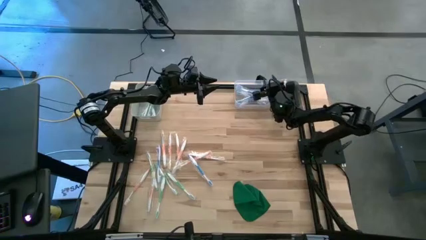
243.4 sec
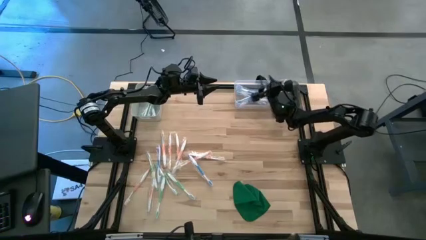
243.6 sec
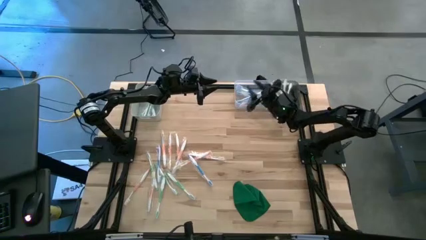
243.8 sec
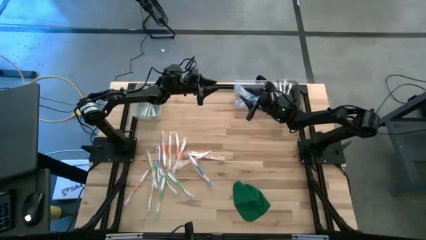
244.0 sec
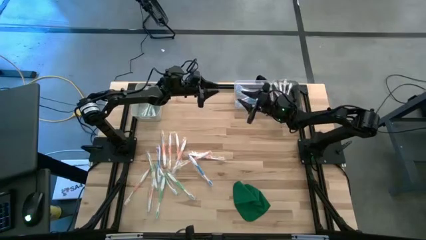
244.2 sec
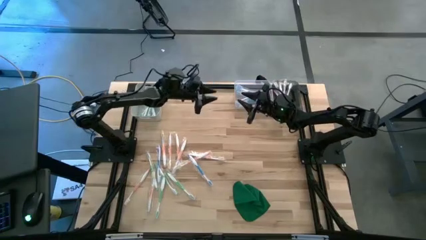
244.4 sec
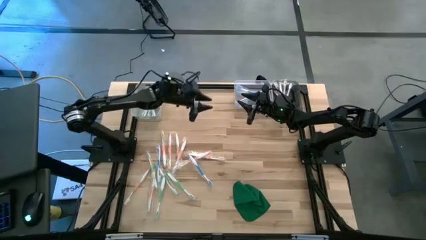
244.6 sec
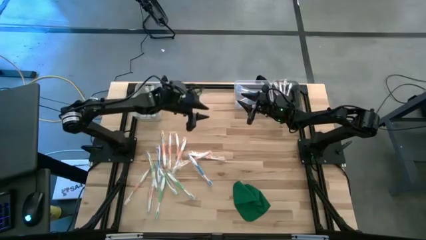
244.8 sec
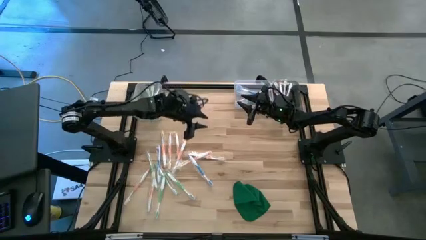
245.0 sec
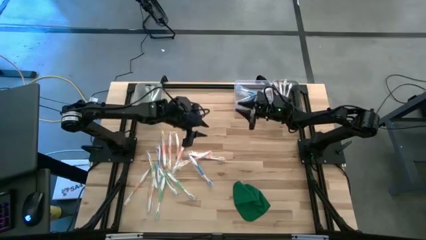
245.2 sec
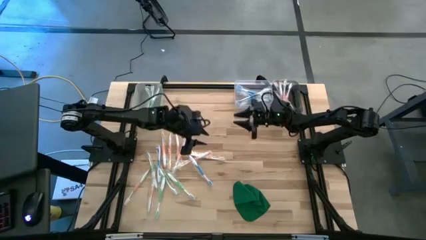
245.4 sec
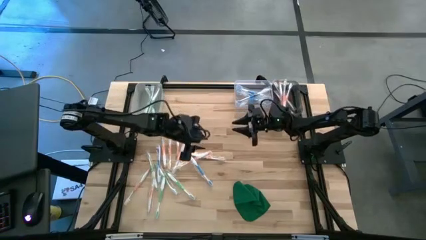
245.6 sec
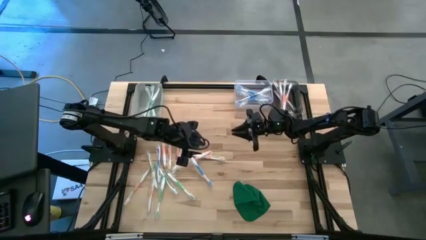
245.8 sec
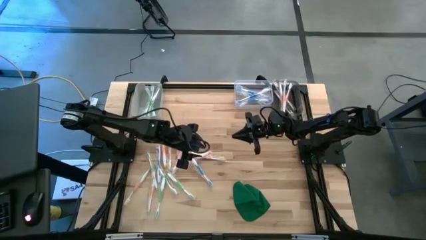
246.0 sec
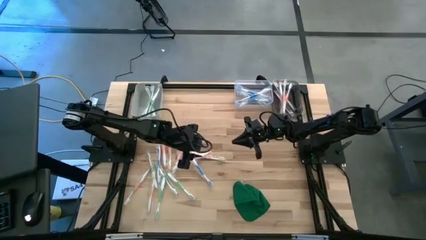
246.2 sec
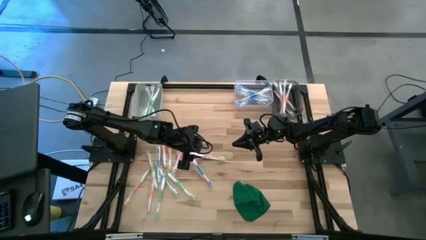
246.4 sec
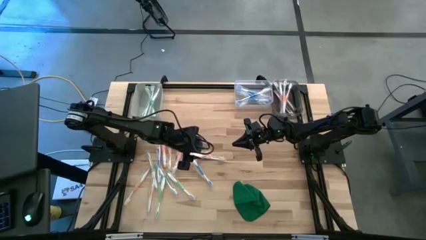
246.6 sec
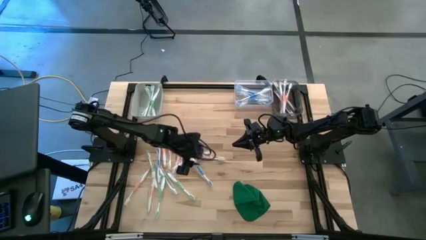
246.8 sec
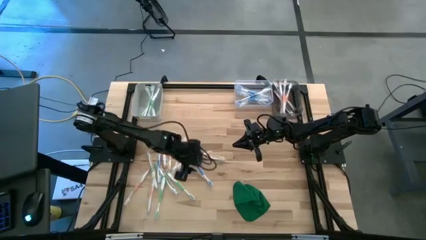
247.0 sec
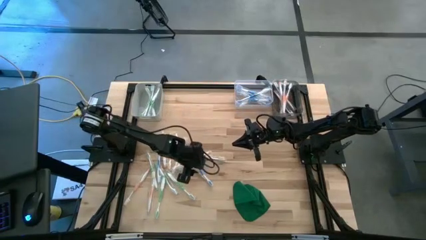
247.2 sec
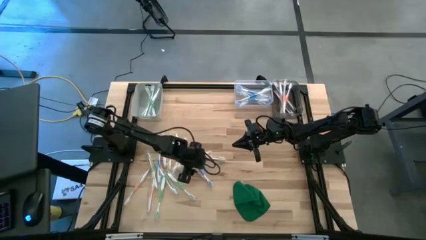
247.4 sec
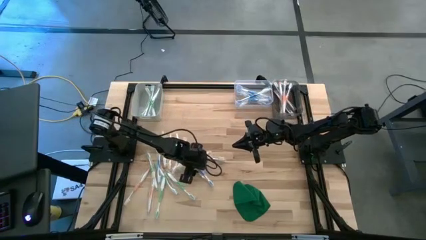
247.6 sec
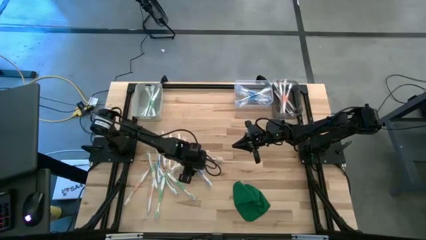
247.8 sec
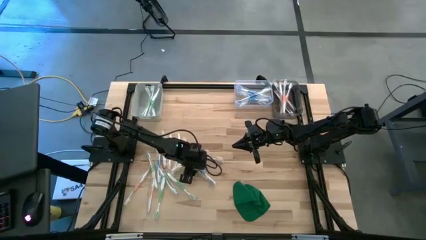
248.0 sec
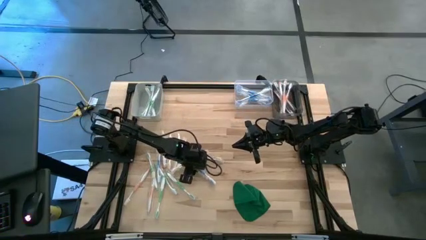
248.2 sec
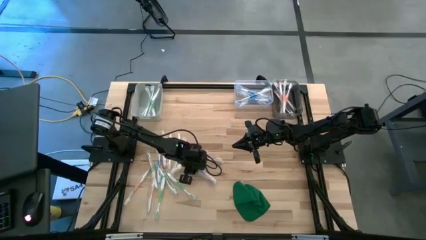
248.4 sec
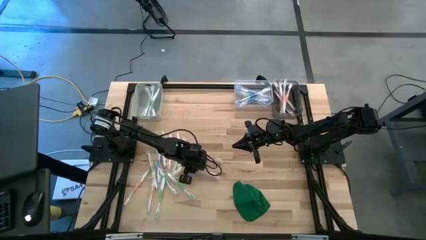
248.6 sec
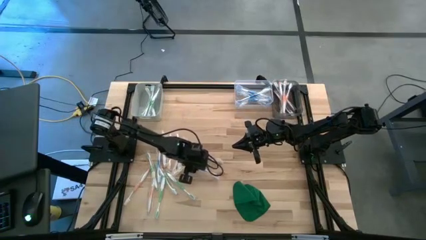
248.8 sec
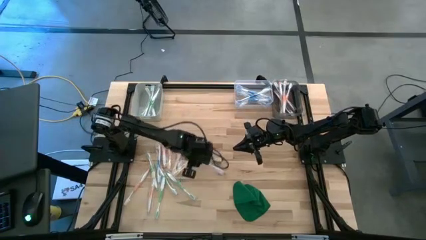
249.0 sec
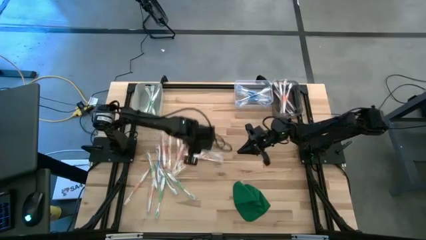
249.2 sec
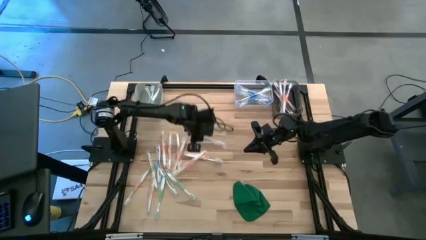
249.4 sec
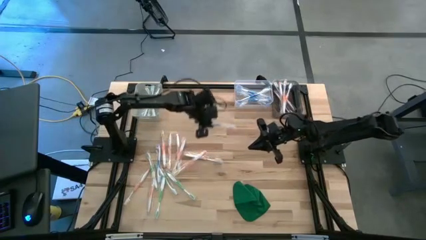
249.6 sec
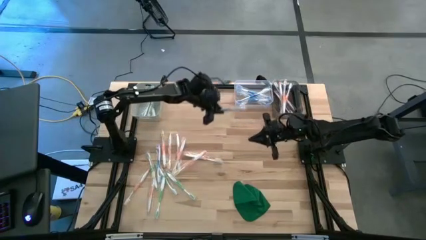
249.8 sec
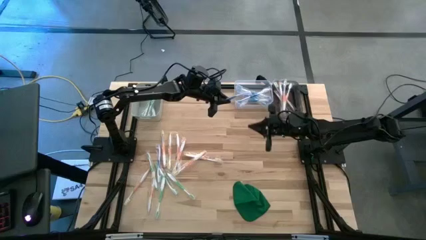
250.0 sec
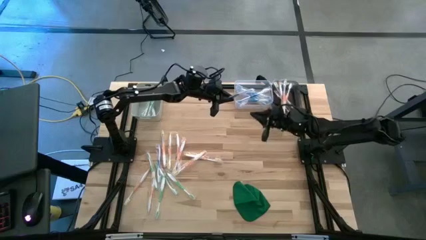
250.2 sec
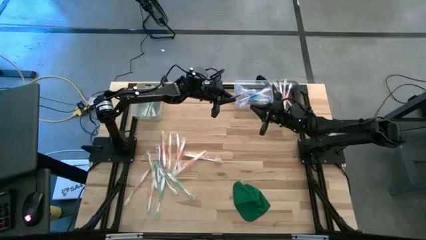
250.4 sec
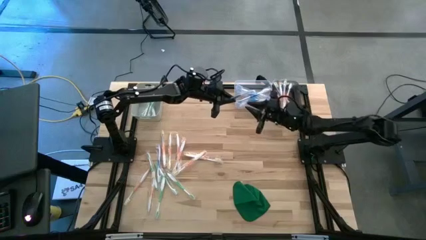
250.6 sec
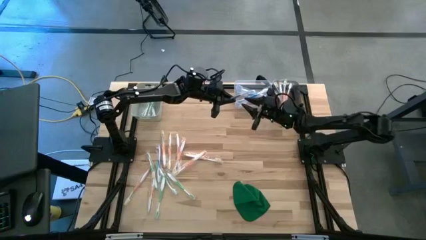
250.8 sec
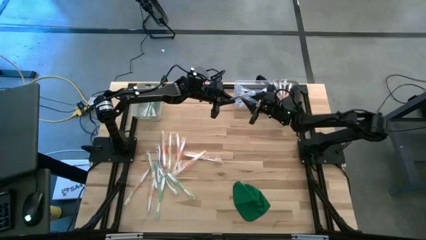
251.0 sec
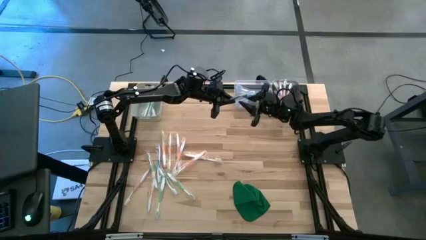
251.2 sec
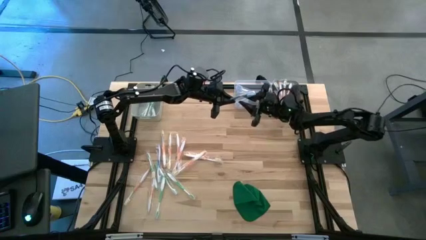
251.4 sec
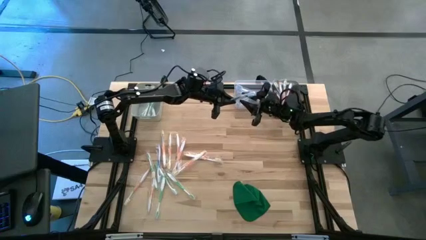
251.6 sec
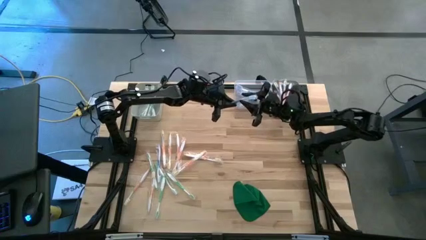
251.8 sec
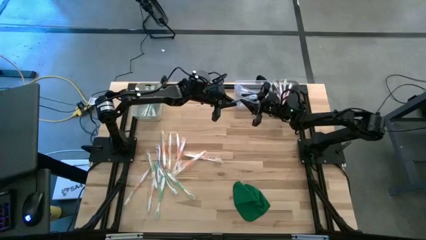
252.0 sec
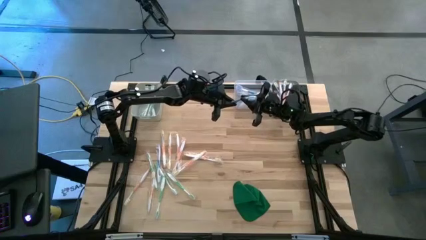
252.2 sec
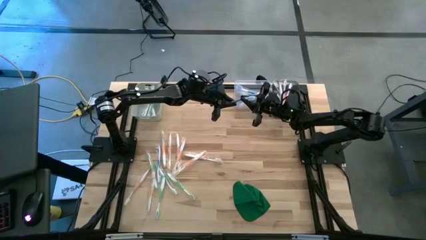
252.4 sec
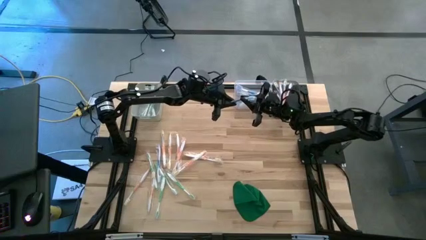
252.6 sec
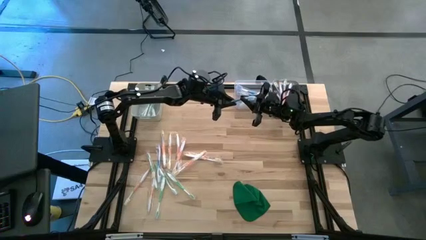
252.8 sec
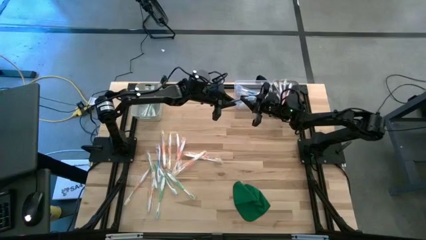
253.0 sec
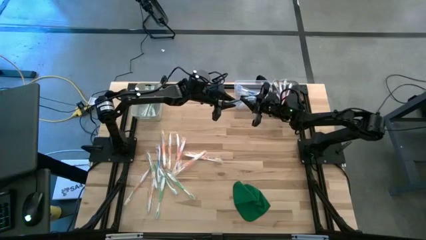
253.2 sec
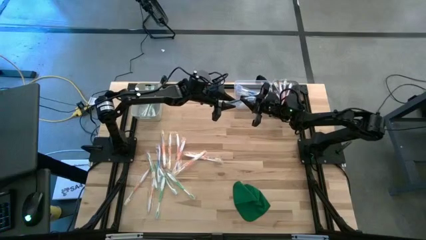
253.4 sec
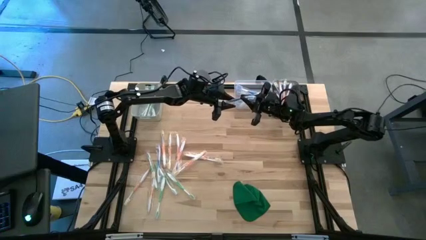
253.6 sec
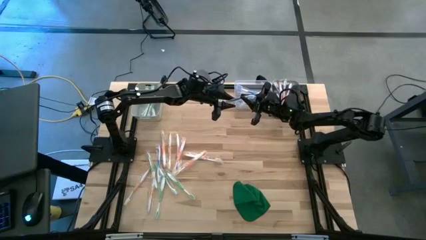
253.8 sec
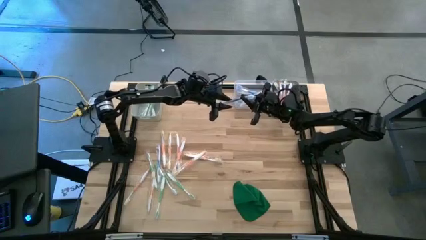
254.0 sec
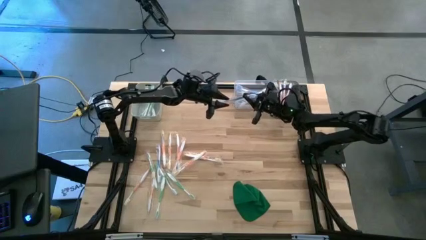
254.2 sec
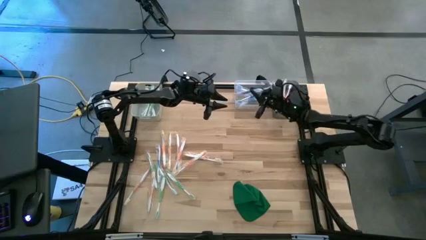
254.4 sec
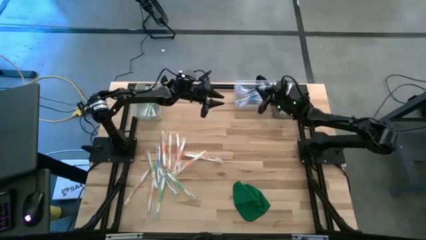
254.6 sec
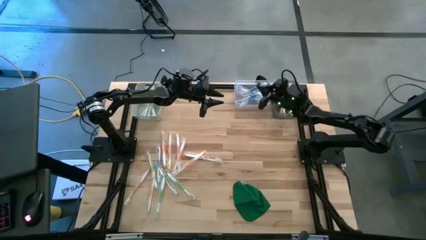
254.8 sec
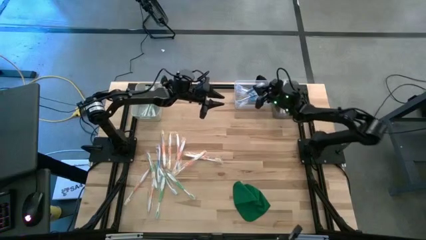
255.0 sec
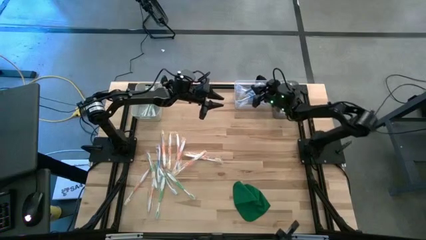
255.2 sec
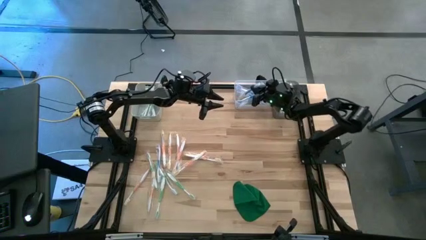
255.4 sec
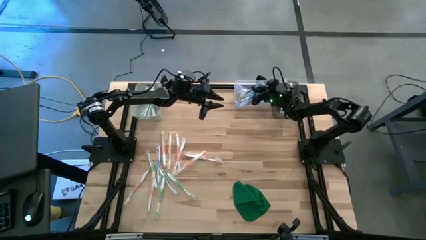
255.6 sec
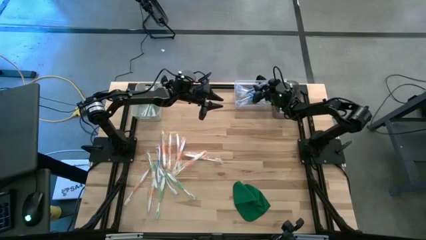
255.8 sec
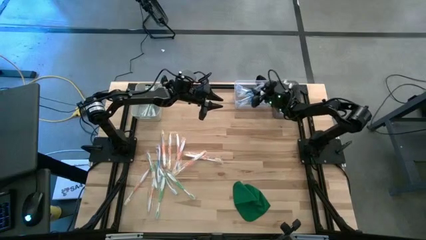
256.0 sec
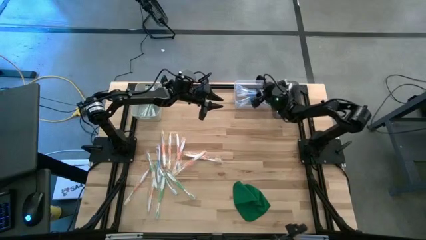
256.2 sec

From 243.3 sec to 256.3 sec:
Task: Pick & Place Toothbrushes
Put the blue toothbrush into the transparent bin
